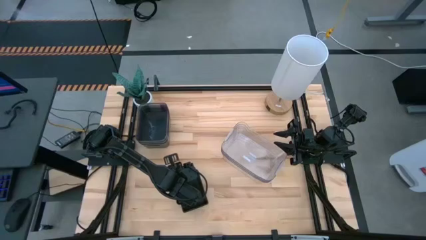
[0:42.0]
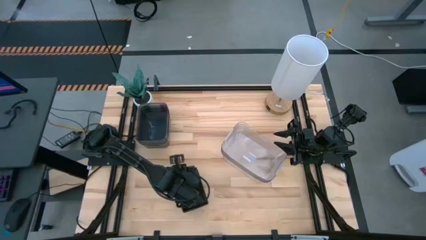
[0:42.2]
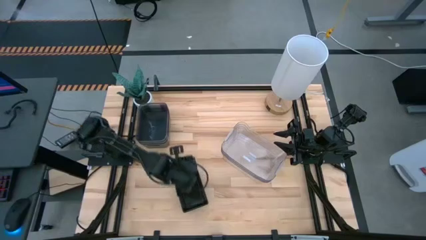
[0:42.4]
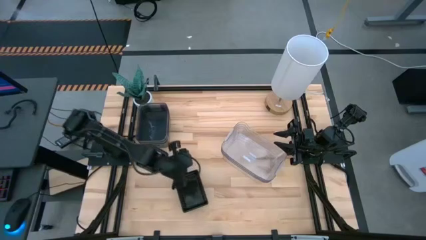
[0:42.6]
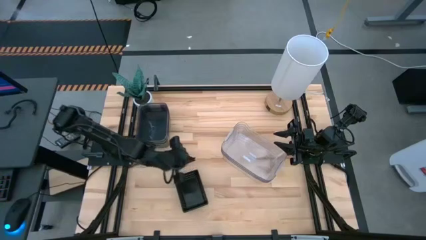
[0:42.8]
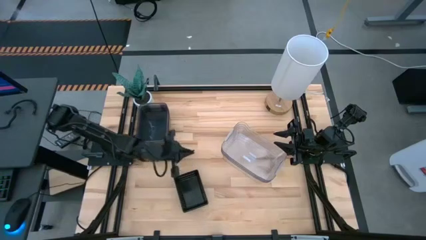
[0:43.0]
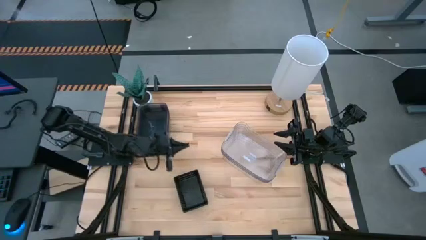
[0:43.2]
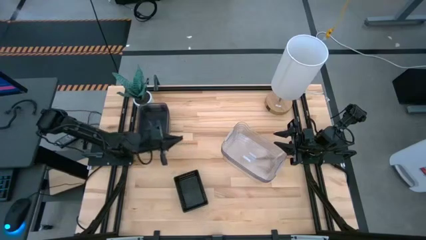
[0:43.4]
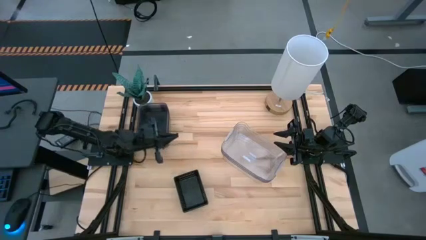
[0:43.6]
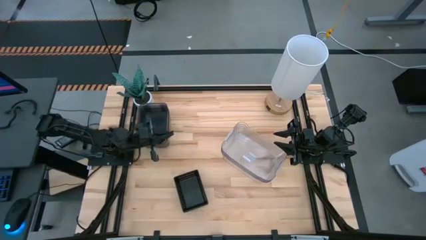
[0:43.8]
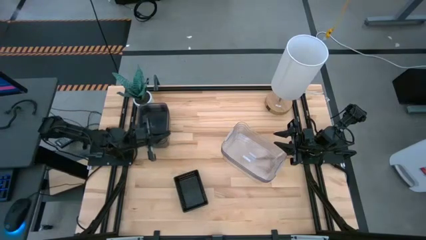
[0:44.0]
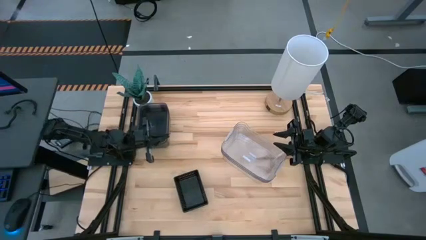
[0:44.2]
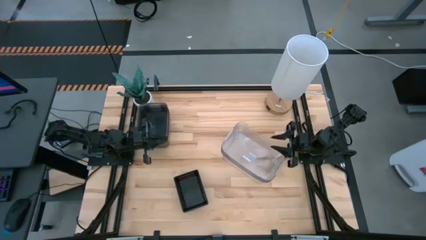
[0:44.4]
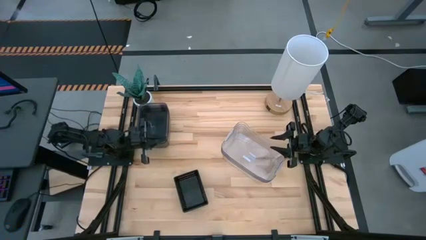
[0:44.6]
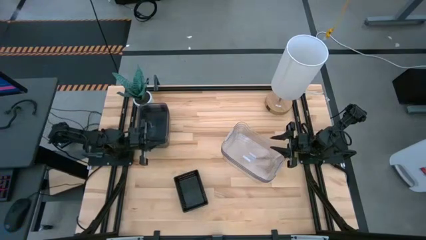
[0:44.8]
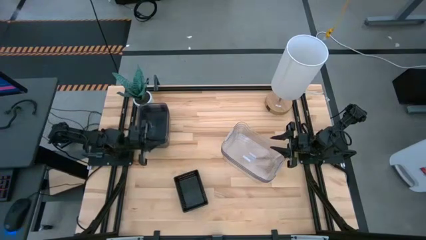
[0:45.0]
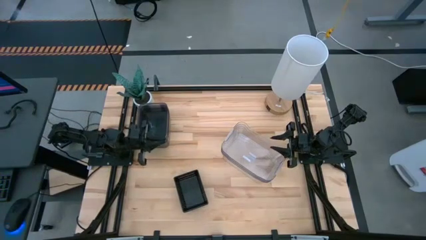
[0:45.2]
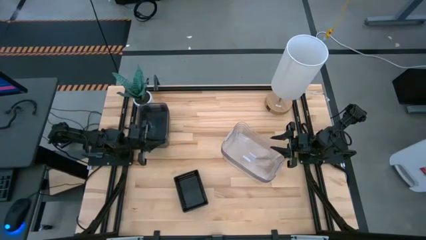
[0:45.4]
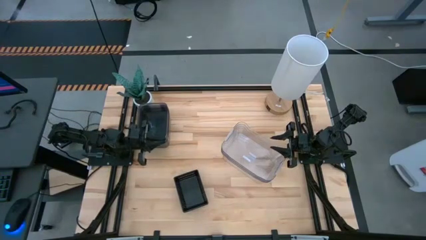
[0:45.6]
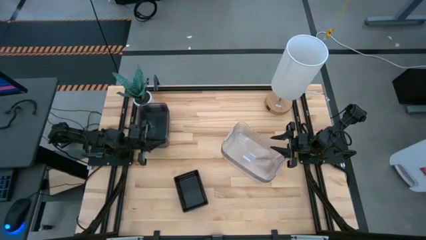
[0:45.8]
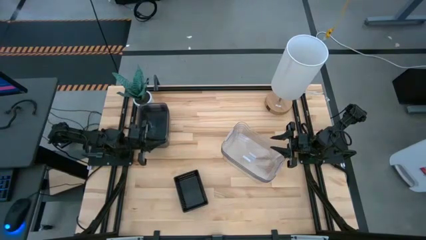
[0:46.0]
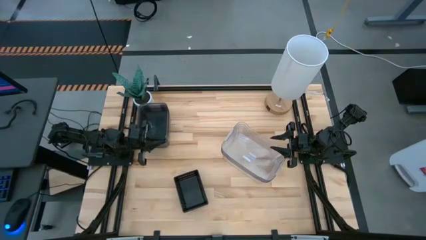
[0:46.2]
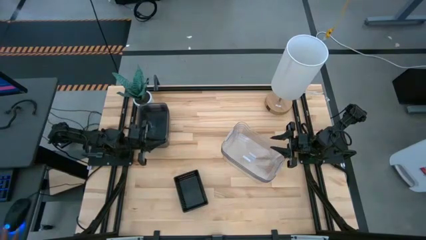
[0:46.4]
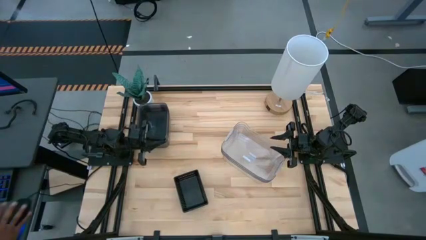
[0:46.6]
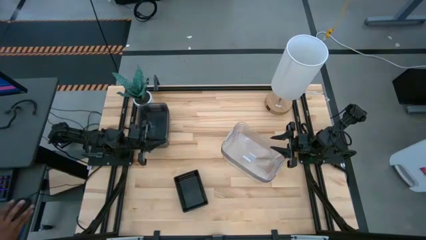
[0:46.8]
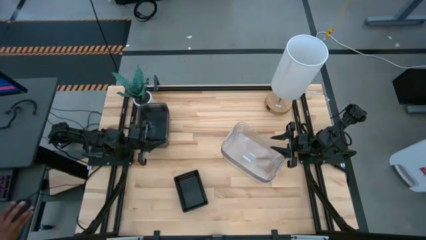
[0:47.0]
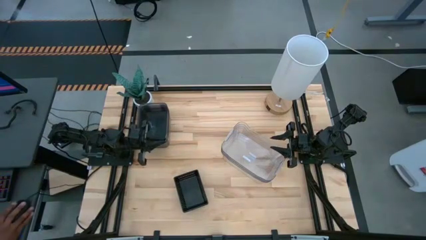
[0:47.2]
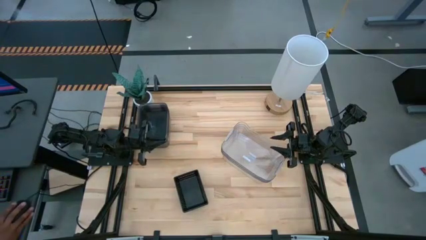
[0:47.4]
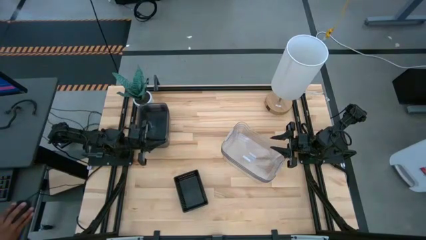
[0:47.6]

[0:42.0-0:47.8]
Return to Home Position

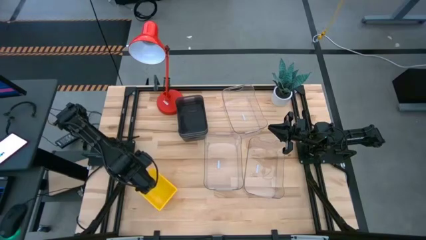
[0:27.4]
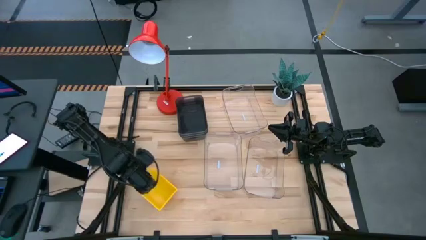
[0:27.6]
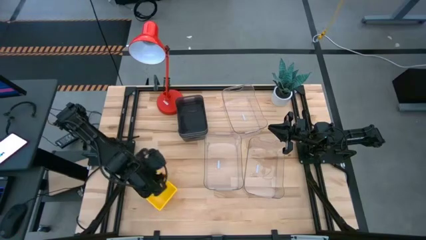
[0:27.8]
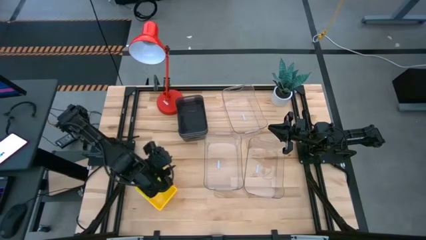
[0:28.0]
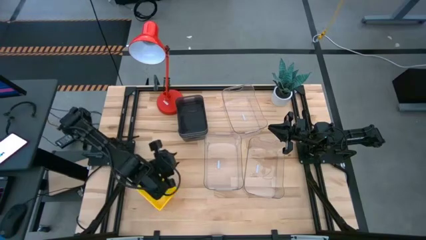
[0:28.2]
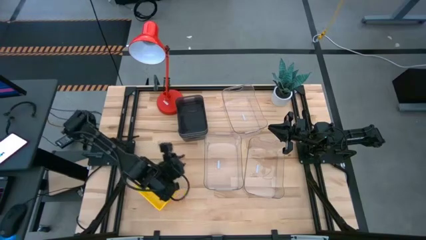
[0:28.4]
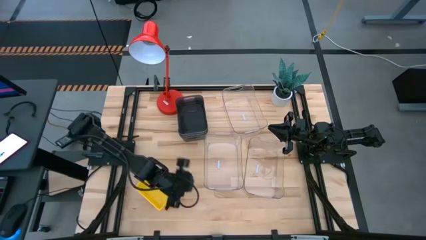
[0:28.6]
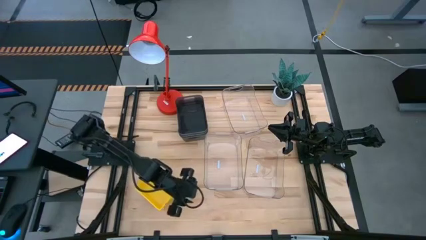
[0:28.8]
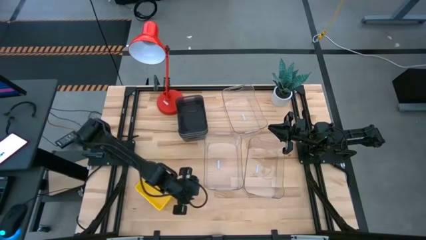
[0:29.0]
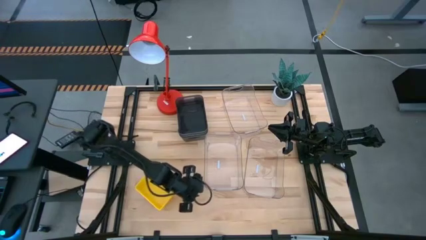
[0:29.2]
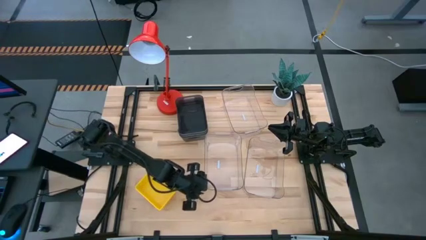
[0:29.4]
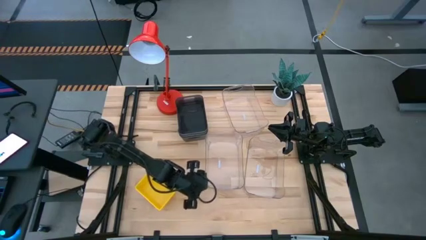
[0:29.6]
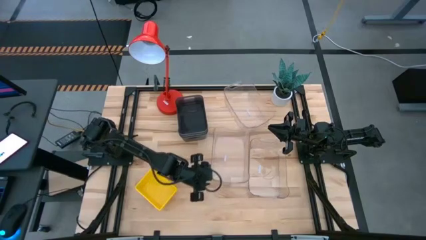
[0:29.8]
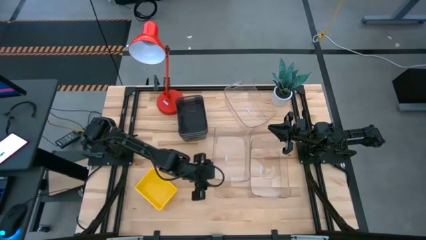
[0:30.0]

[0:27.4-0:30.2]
Adjust the bottom left transparent bin
